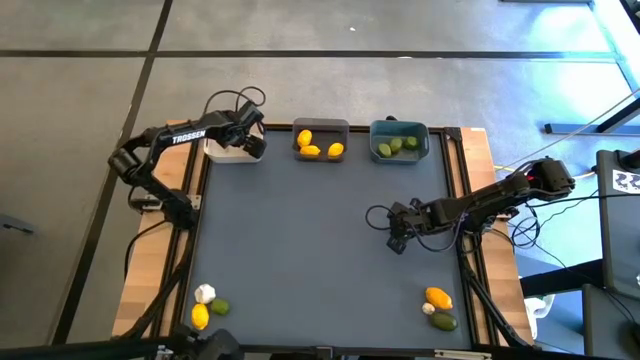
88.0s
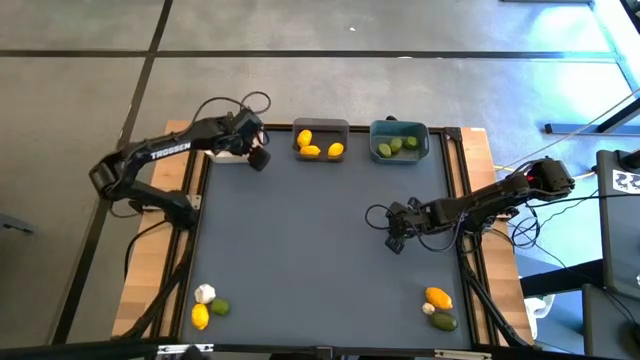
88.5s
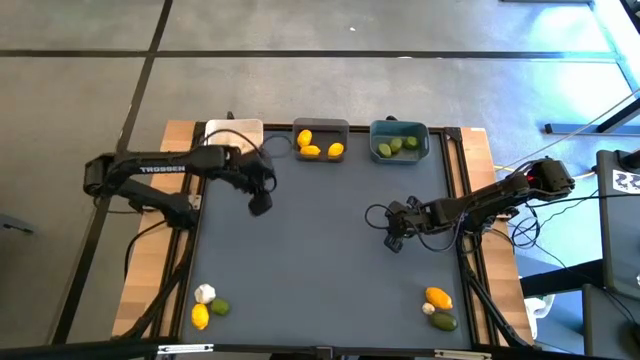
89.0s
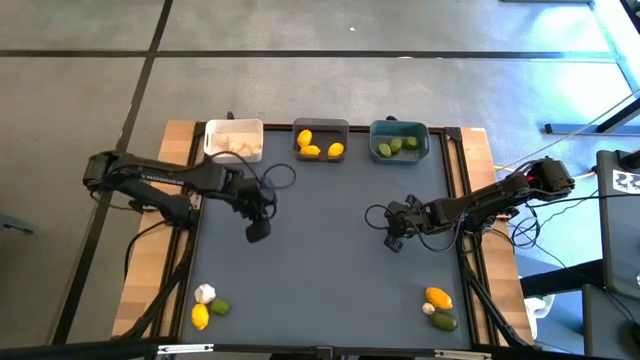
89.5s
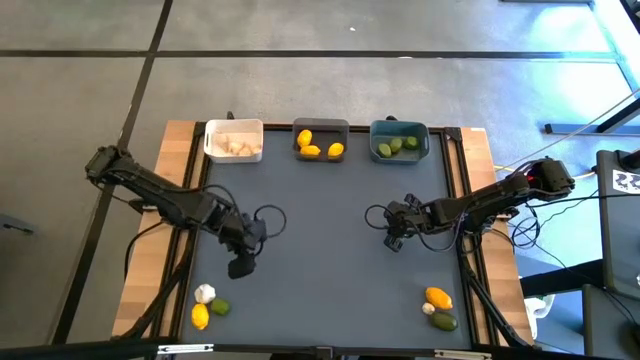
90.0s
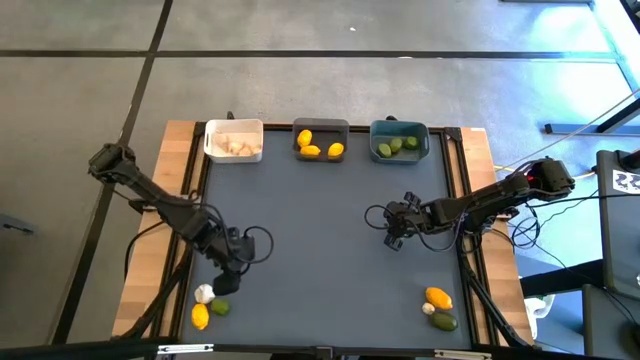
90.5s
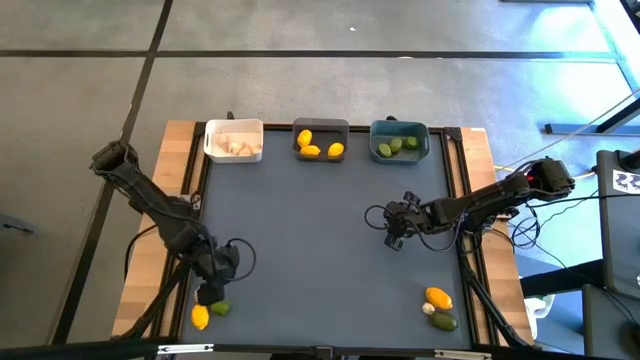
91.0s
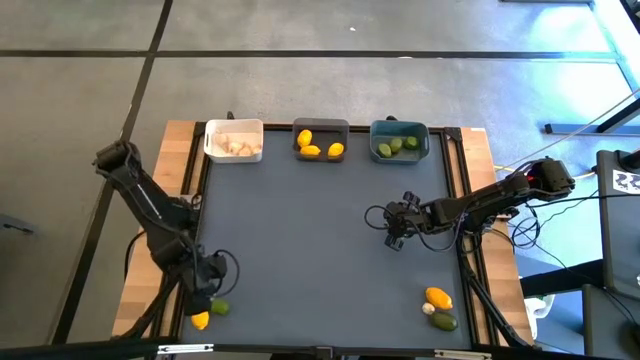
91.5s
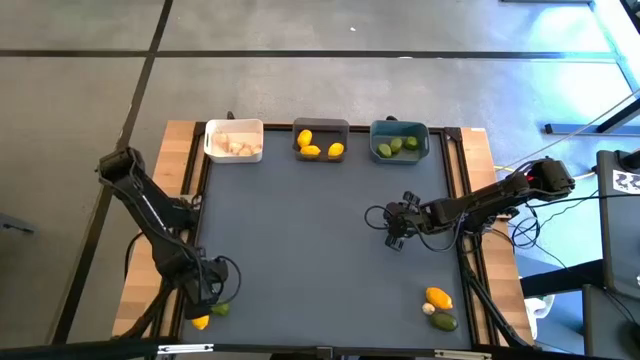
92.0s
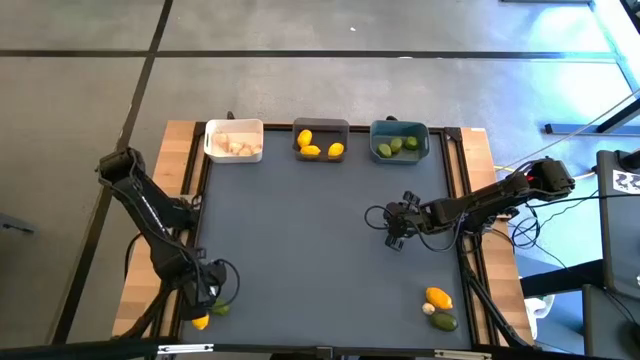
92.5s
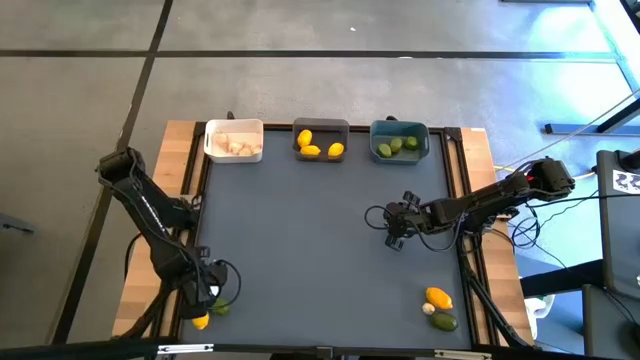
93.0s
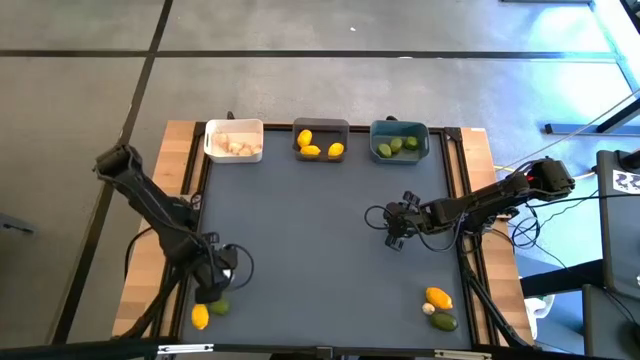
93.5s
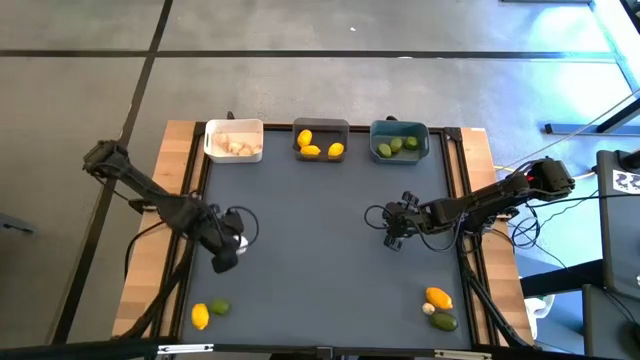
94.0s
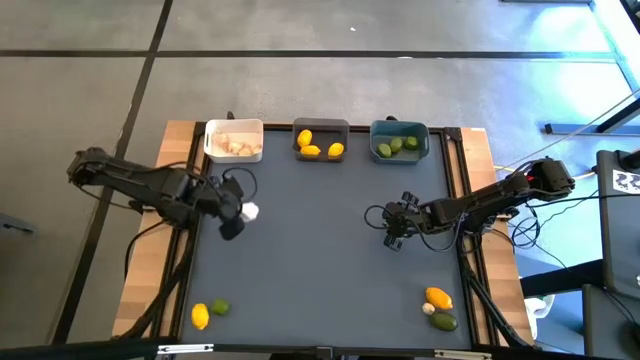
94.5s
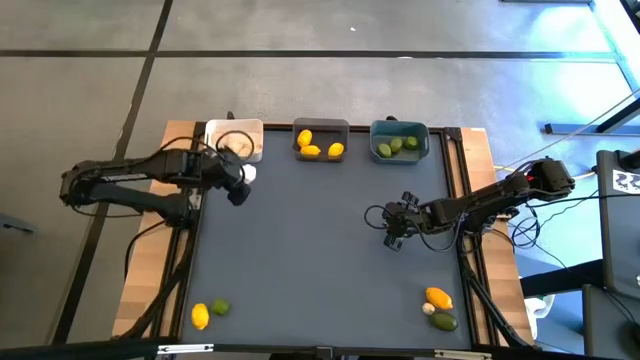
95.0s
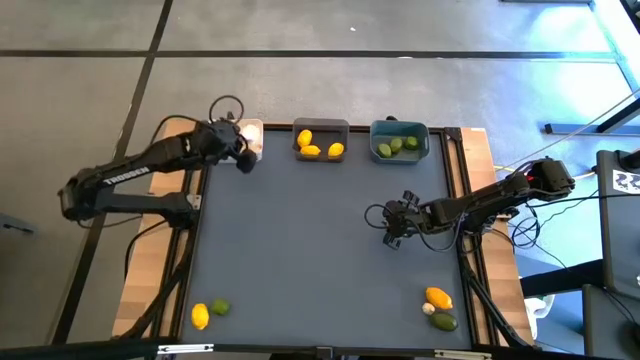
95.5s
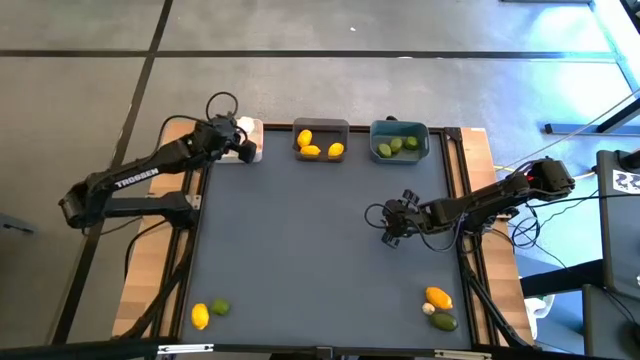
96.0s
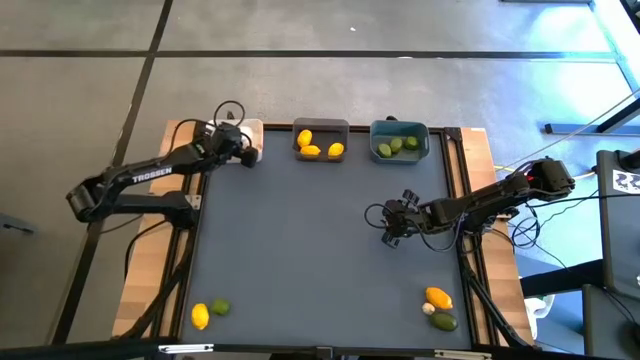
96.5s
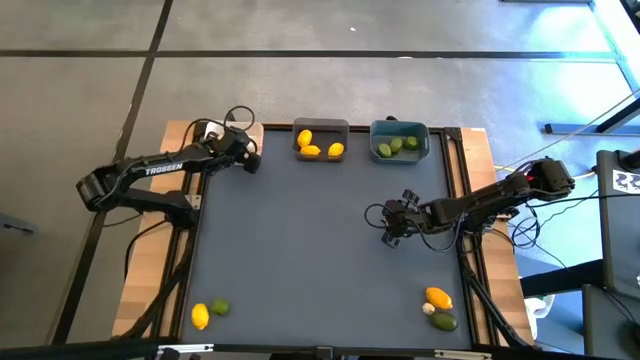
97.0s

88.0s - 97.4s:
Task: Sort produce into baskets
Put the garlic into the white bin

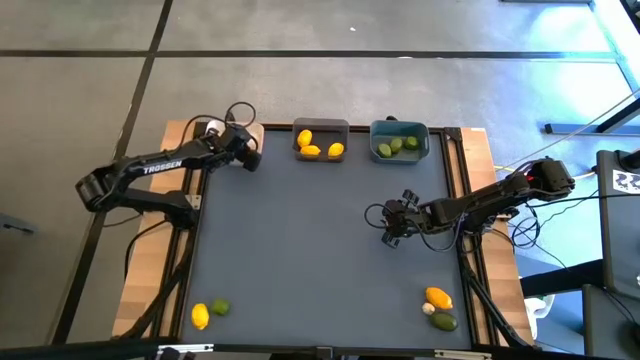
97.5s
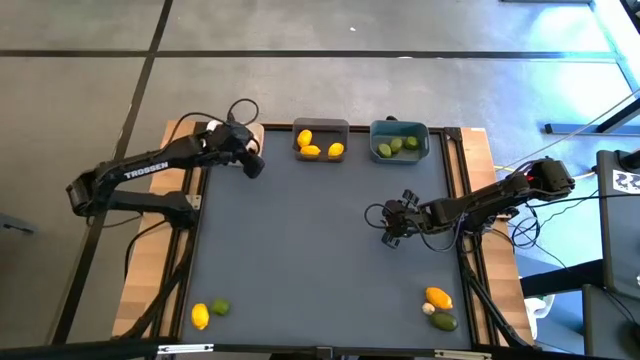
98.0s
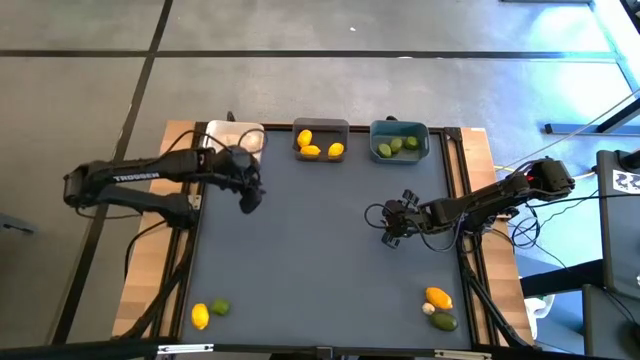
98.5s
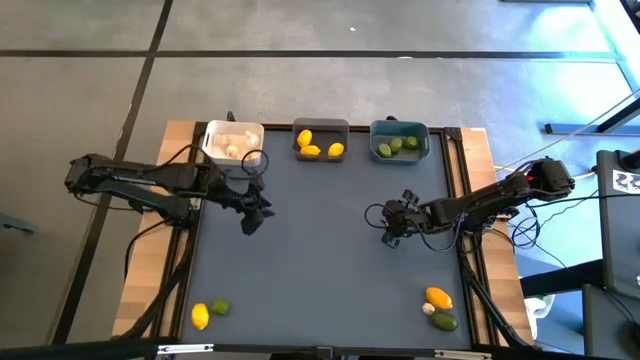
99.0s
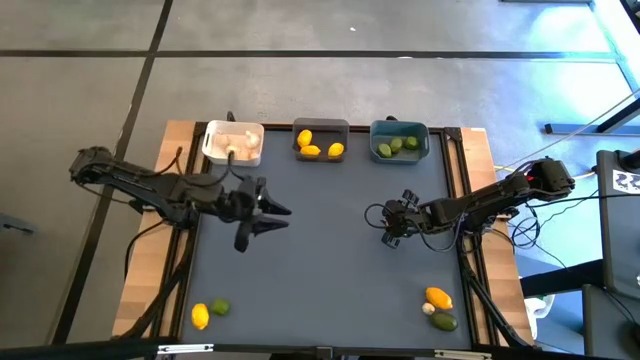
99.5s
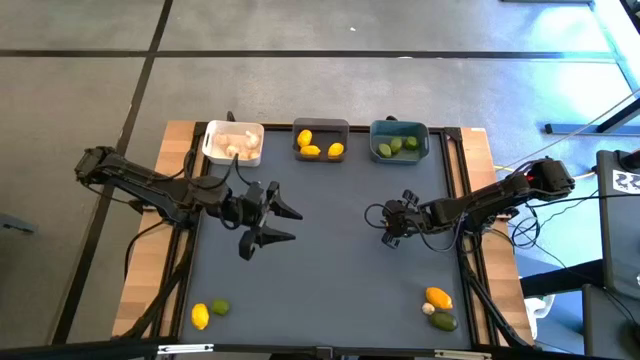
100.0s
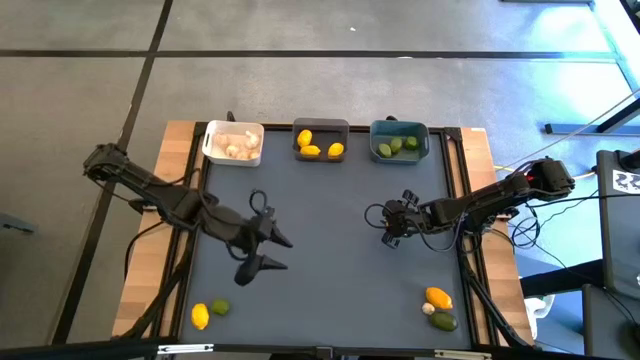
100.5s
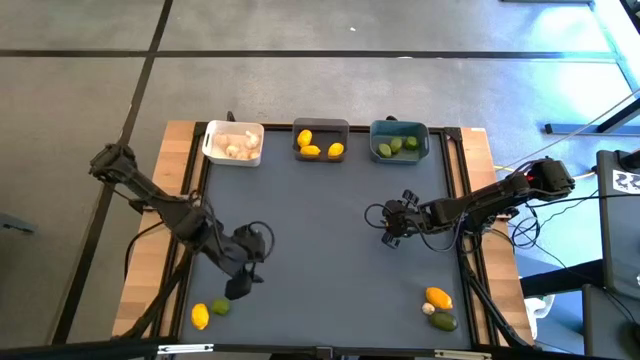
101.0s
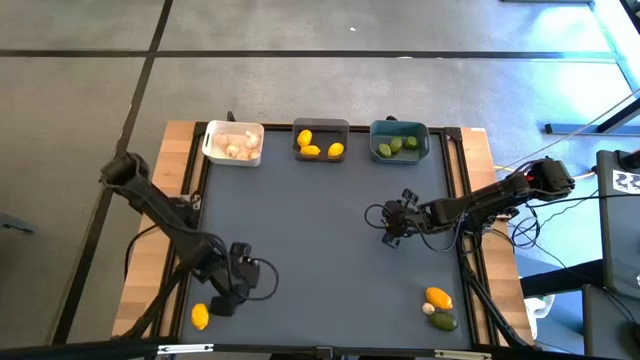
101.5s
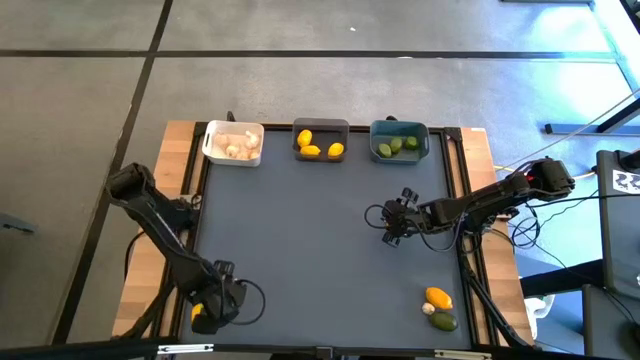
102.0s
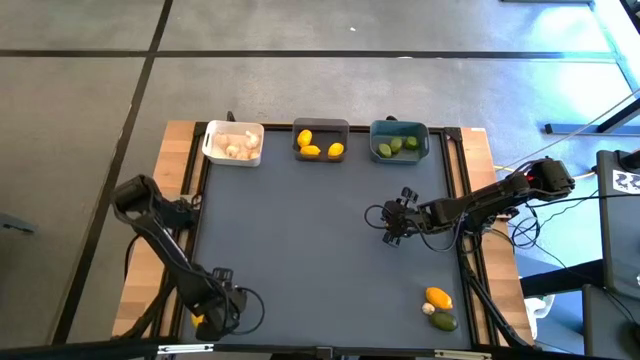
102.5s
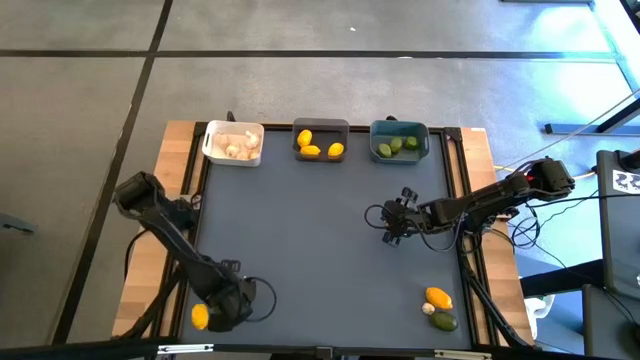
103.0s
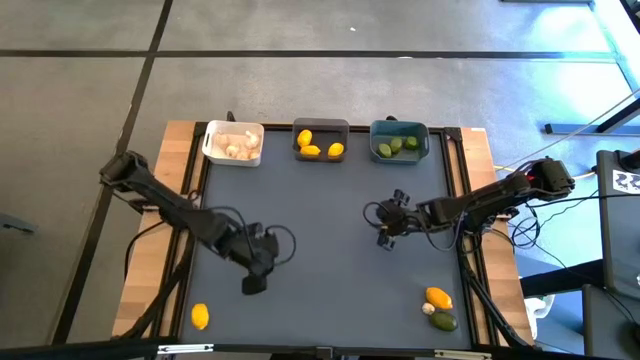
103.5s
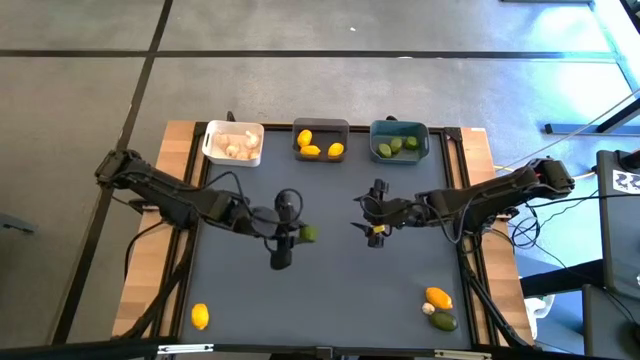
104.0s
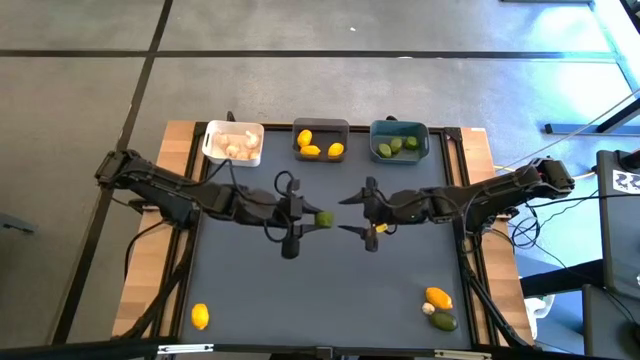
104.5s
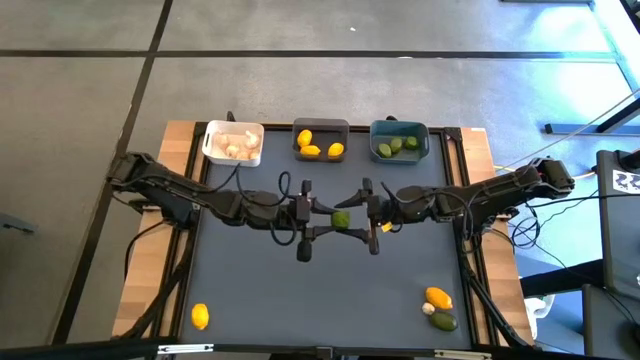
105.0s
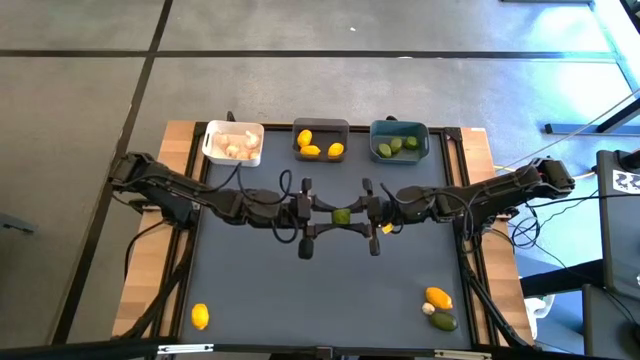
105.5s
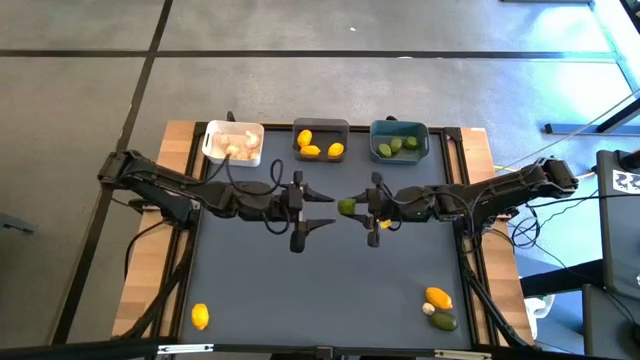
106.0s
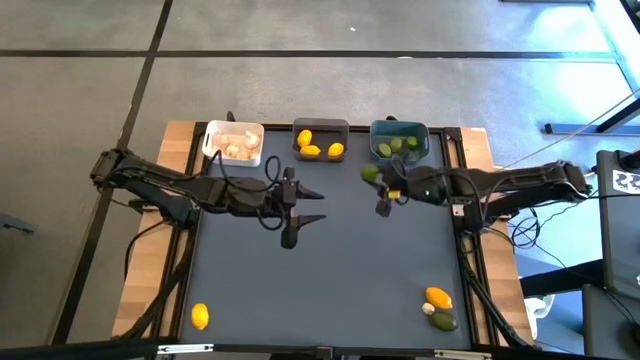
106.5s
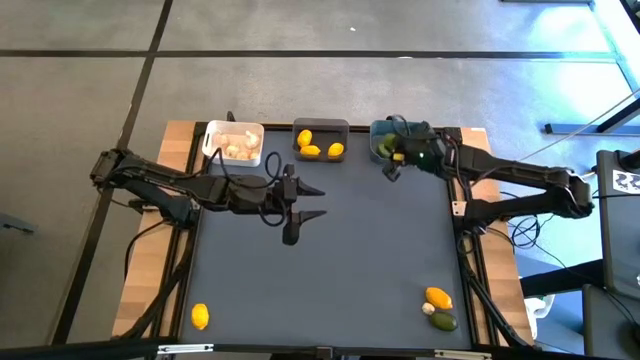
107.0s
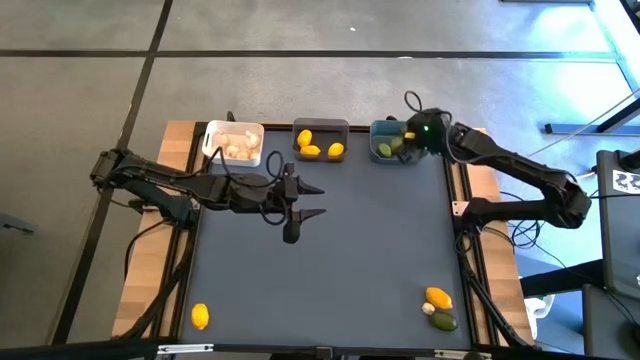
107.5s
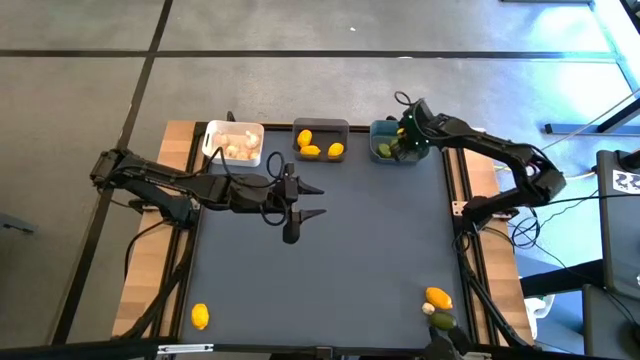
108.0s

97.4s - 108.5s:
Put the lime into the blue bin
